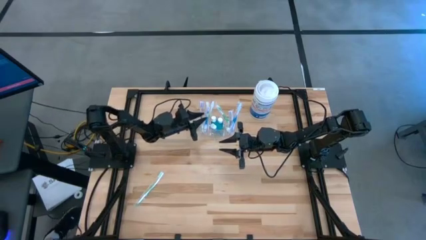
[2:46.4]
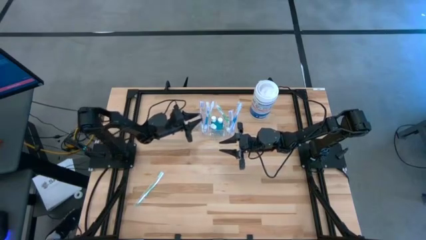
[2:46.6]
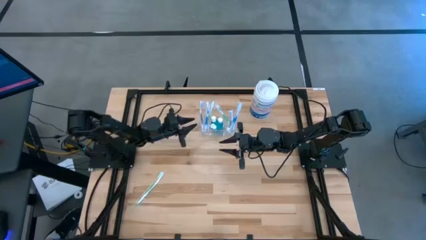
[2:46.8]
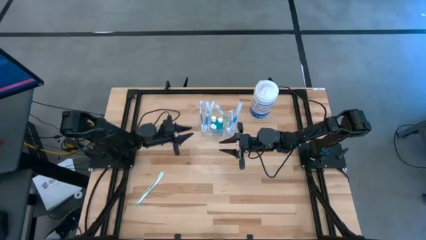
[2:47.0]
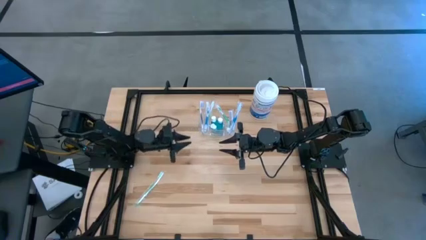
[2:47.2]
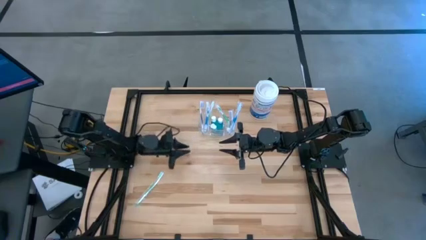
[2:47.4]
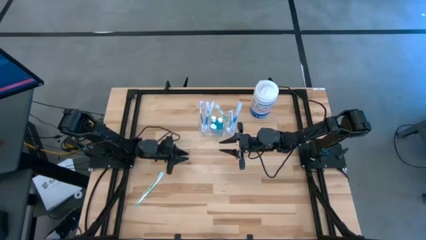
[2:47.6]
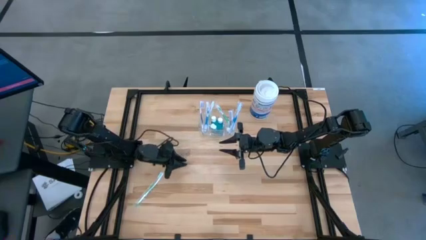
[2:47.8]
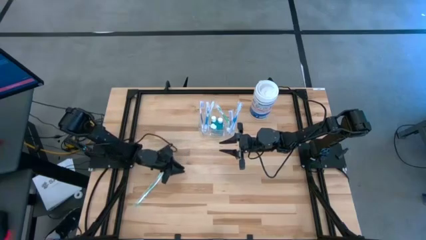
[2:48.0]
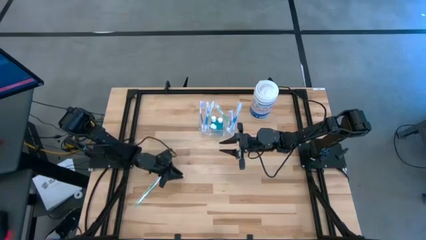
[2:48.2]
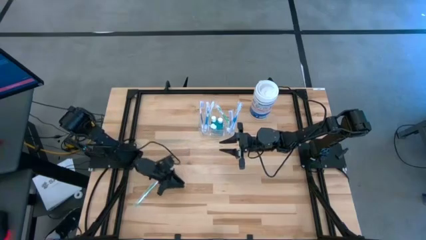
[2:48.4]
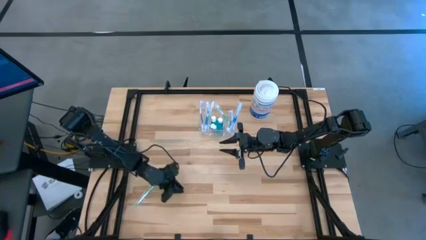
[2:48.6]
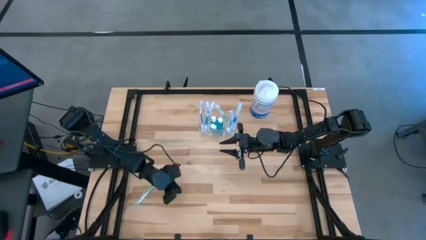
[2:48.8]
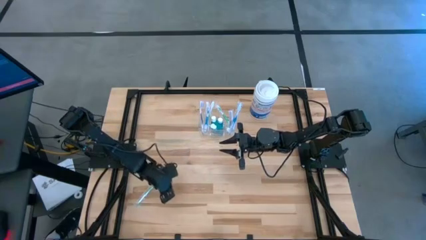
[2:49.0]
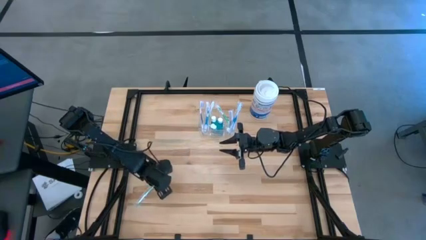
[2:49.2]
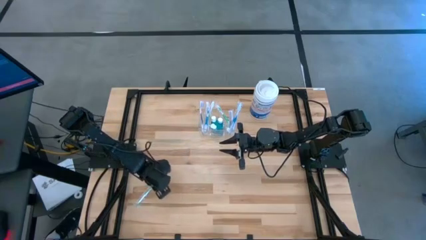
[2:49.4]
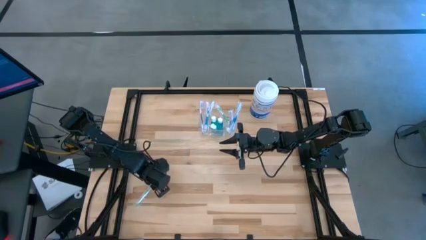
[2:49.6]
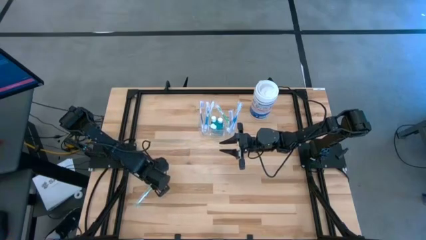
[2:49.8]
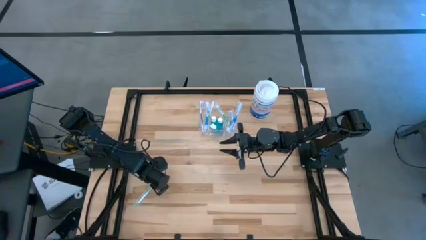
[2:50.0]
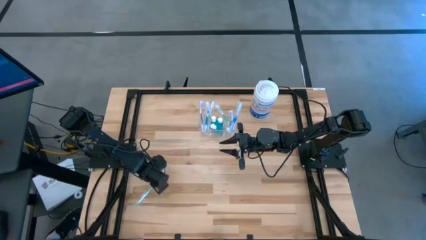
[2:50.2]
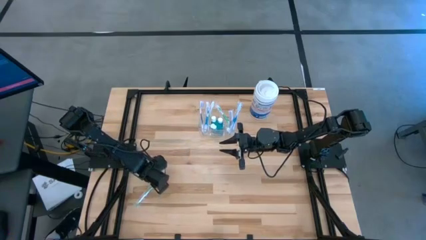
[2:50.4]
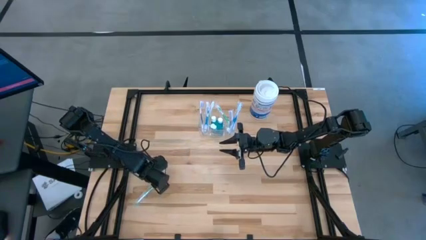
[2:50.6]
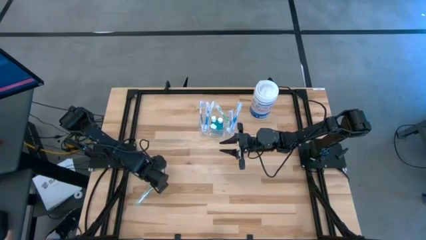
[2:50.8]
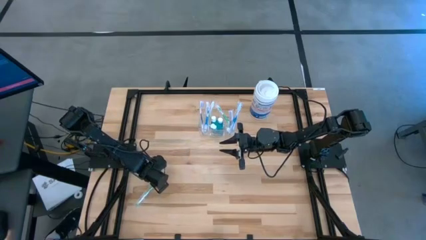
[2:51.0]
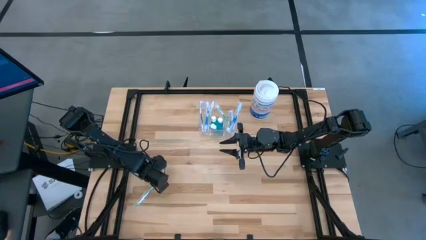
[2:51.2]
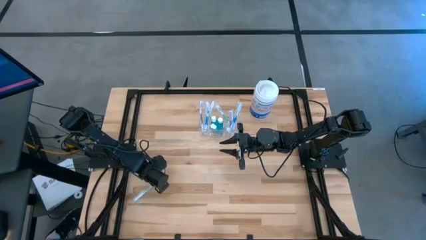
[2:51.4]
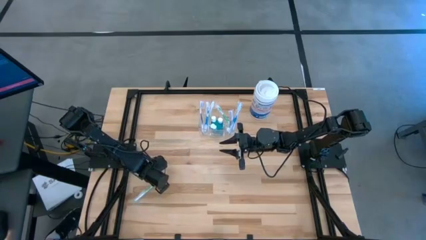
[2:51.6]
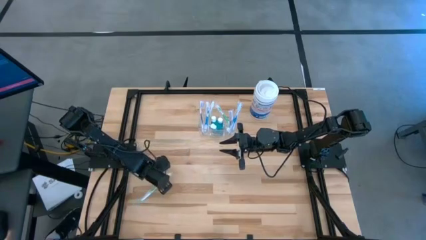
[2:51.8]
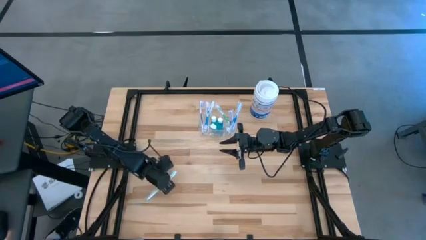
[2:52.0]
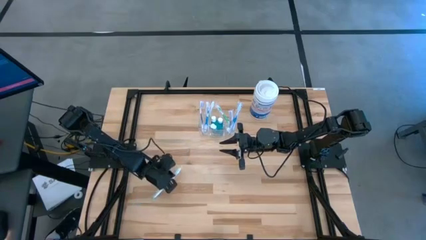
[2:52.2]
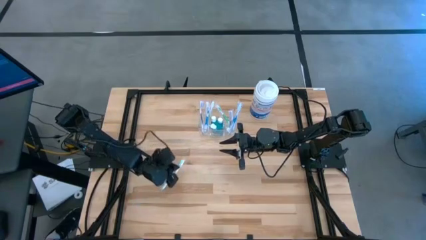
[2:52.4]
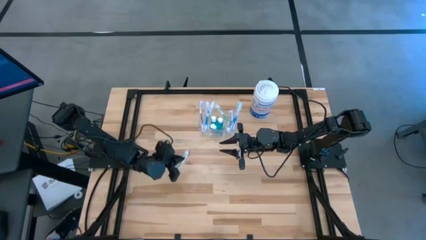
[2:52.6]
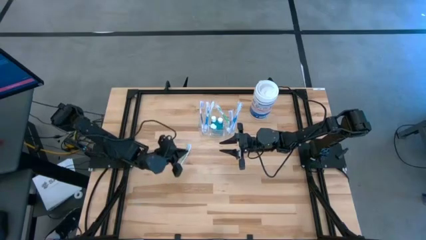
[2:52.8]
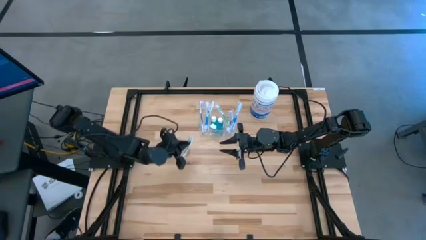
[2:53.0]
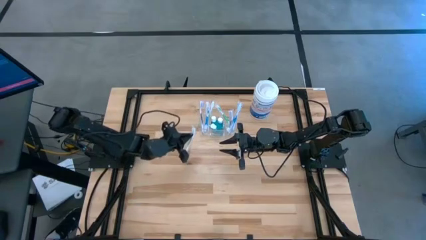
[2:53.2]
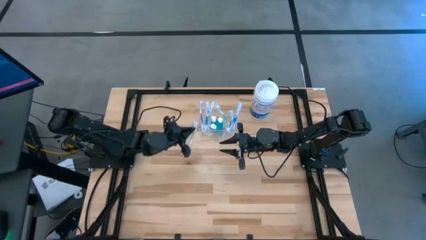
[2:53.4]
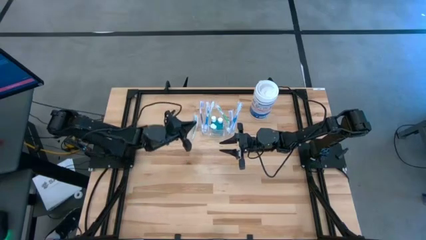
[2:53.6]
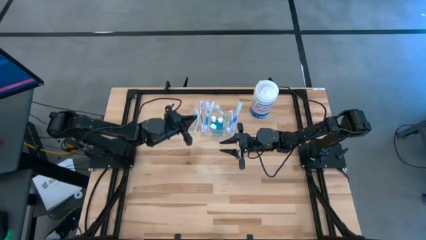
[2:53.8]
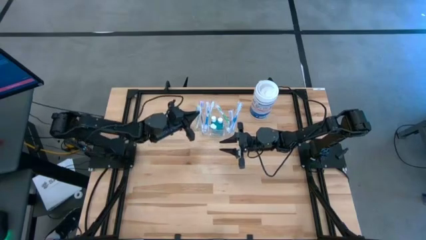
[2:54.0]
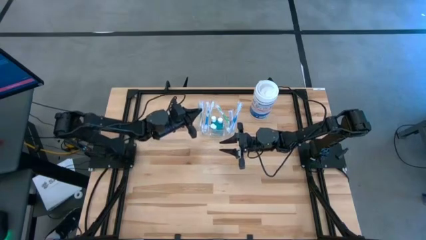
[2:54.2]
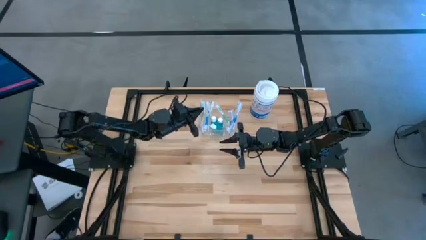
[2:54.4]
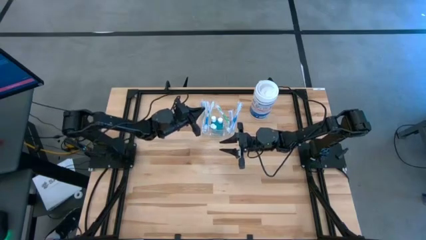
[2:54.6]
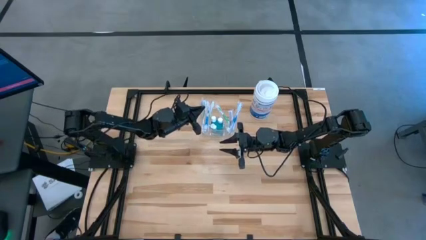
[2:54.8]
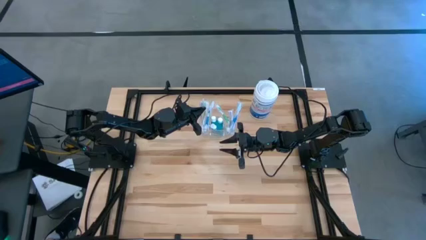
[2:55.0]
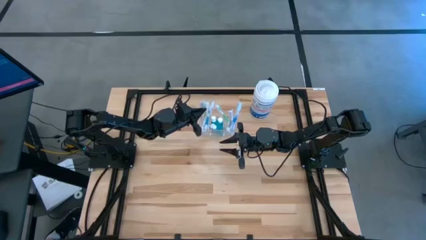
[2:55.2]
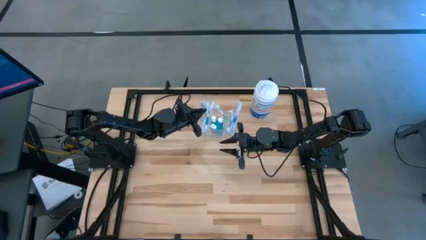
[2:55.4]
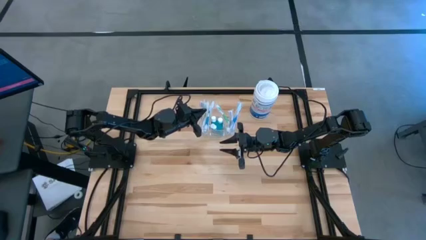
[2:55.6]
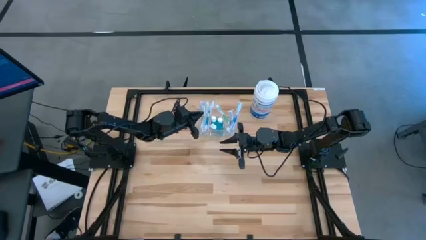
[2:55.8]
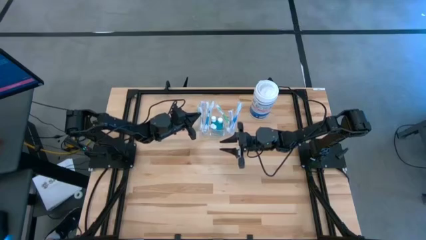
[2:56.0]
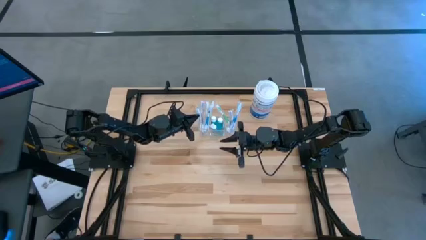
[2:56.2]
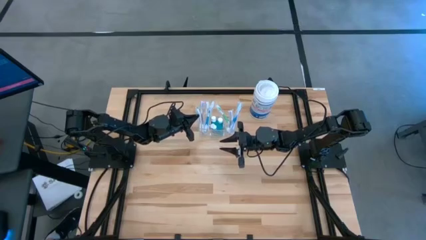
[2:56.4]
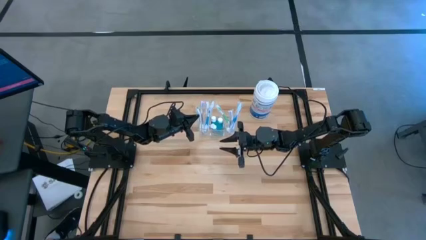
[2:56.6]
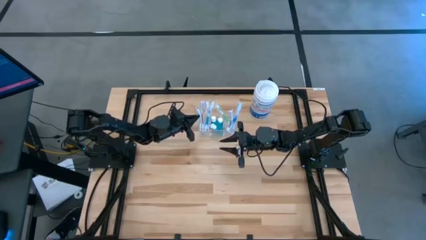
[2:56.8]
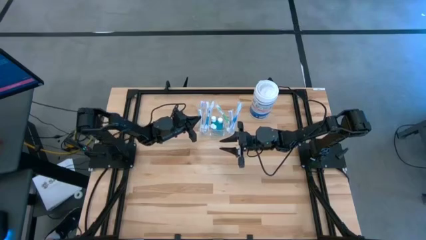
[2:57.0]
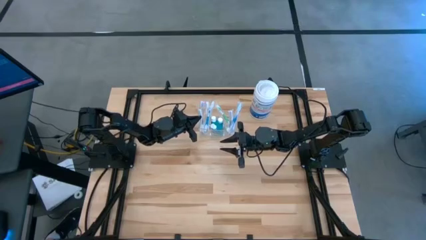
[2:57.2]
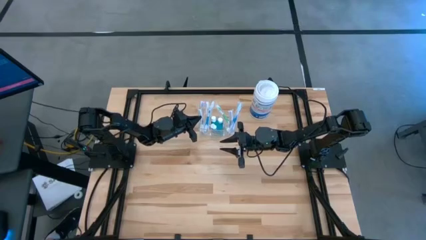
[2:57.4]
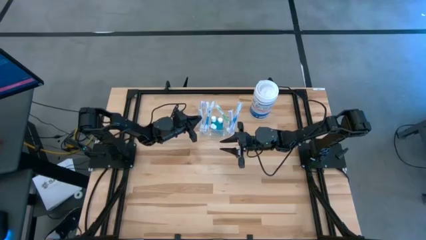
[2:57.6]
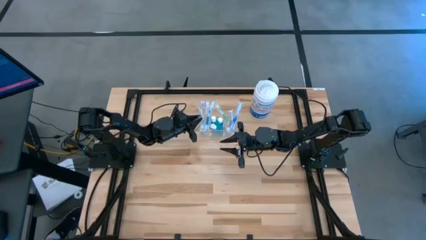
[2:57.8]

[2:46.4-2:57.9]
Task: Pick & Place toothbrushing station
Put the green toothbrush into the transparent organizer

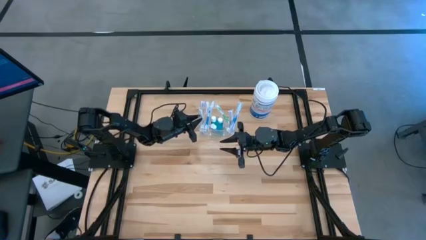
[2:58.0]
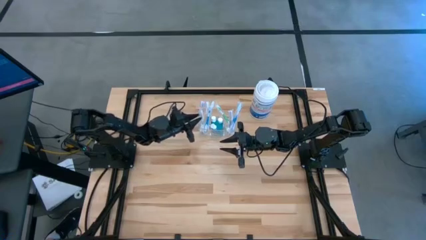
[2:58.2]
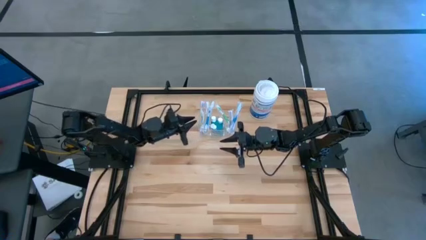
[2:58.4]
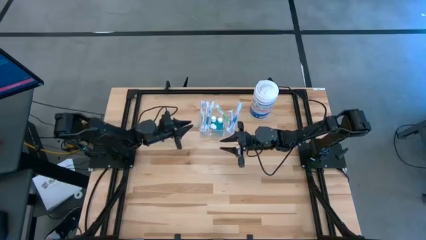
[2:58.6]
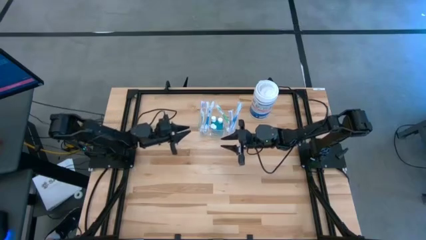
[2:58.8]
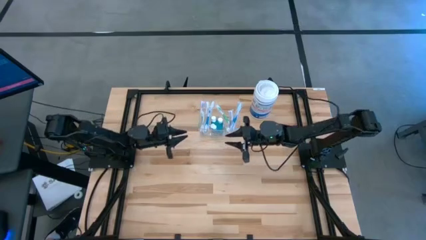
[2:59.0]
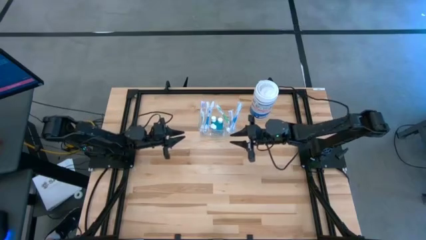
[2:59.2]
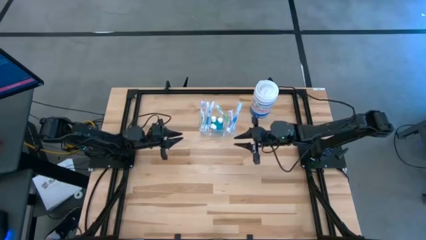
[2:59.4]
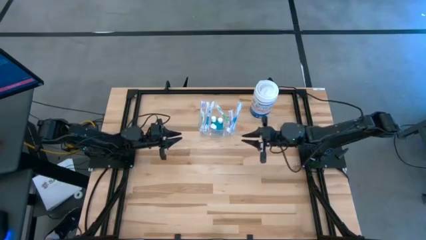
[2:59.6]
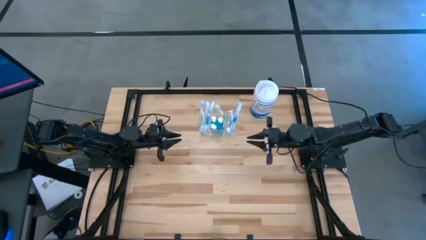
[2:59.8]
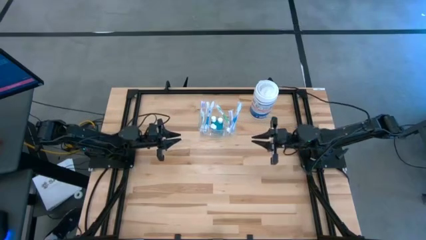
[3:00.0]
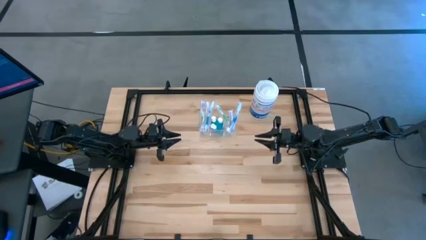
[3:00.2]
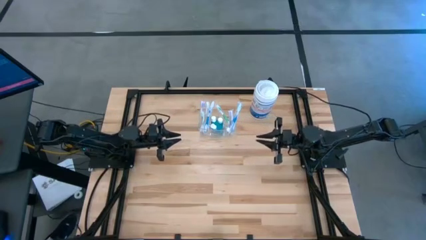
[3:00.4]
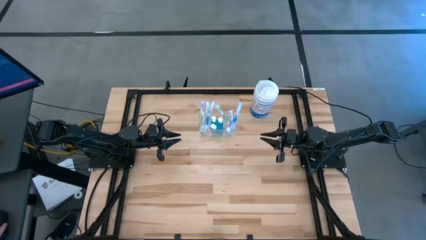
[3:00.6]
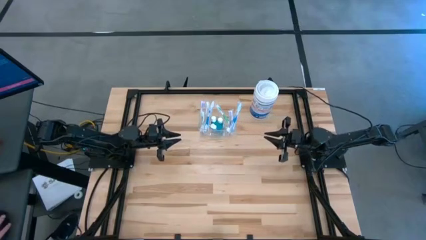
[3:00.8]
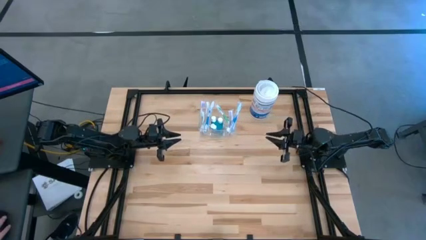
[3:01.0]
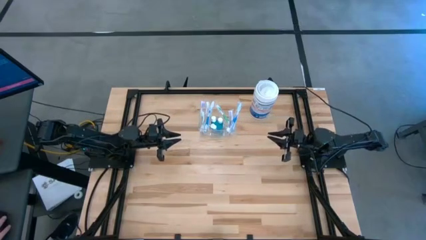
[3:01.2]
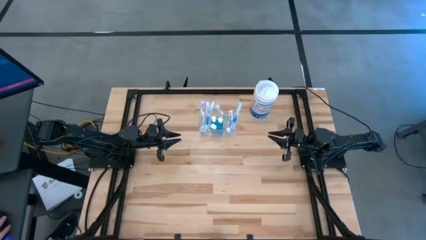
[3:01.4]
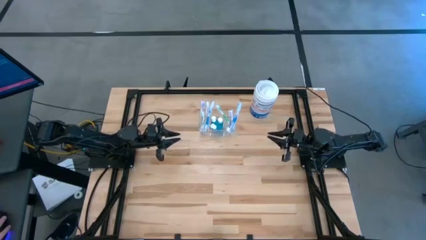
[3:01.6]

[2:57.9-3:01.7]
Return to Home Position
